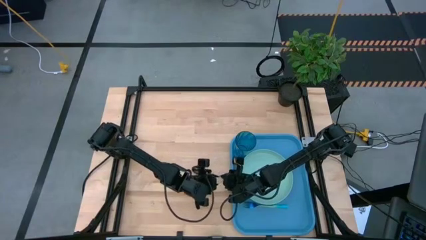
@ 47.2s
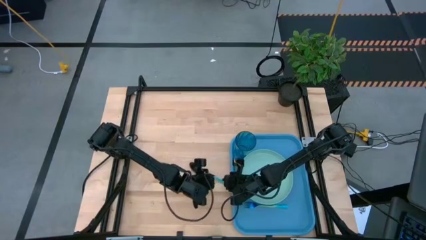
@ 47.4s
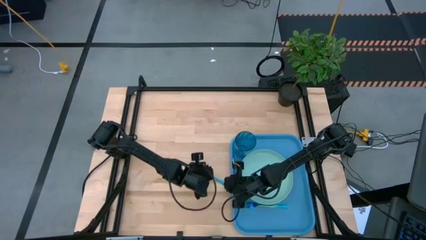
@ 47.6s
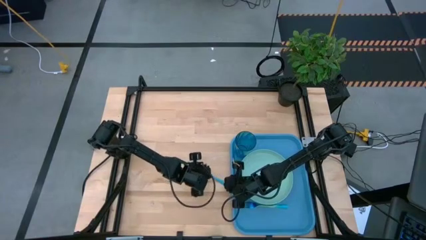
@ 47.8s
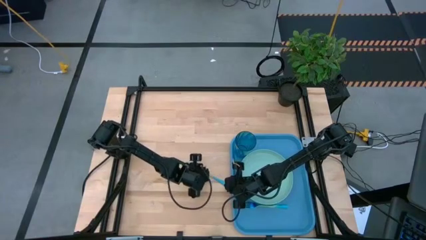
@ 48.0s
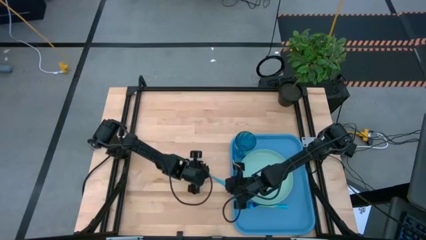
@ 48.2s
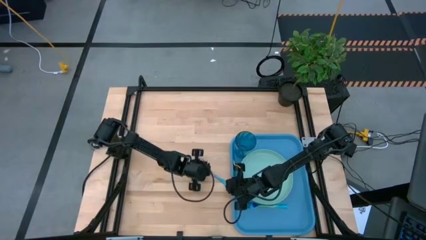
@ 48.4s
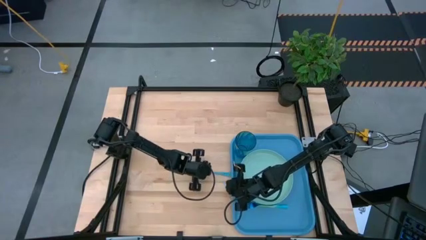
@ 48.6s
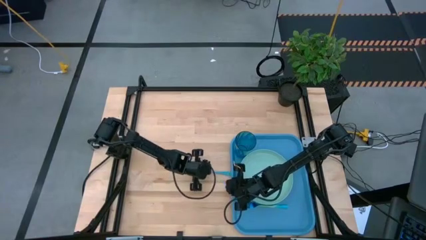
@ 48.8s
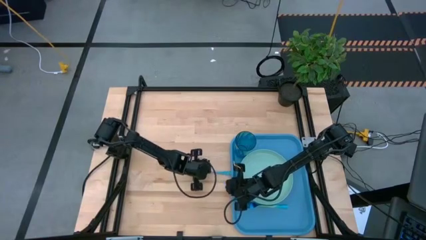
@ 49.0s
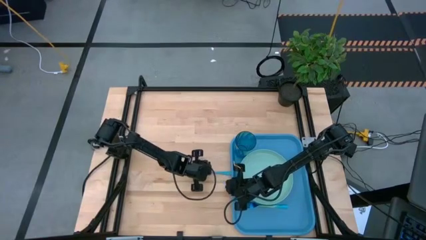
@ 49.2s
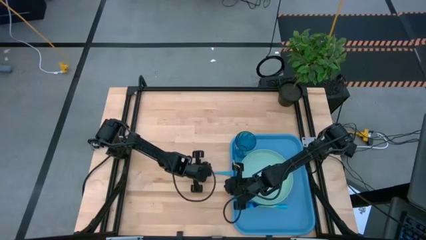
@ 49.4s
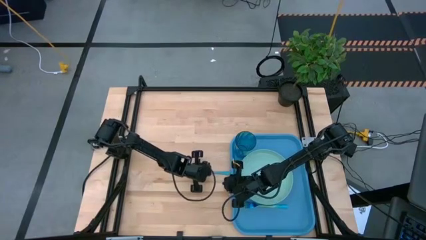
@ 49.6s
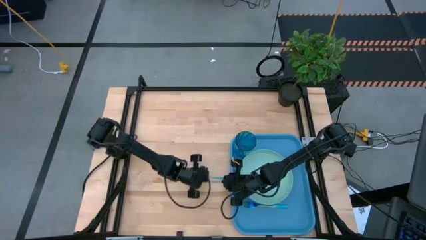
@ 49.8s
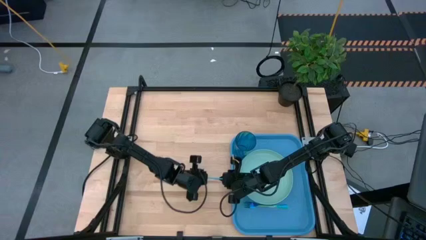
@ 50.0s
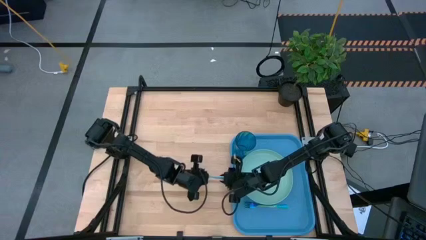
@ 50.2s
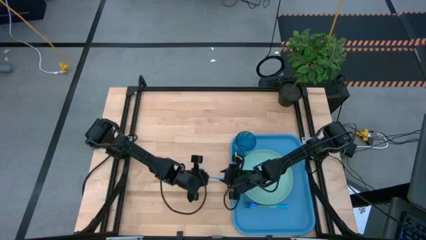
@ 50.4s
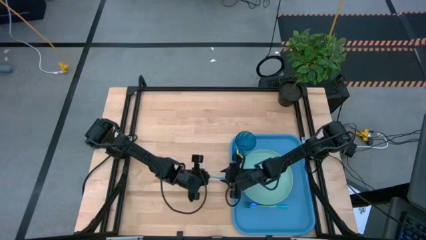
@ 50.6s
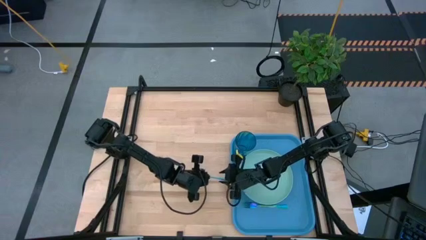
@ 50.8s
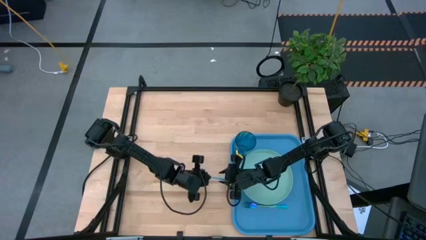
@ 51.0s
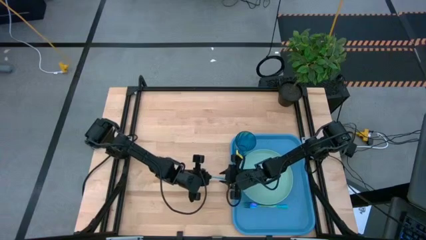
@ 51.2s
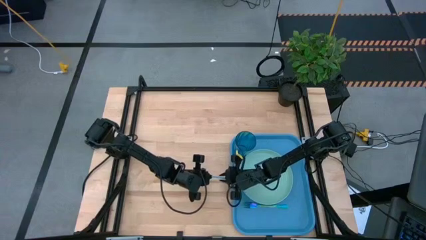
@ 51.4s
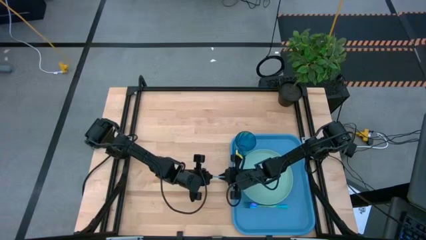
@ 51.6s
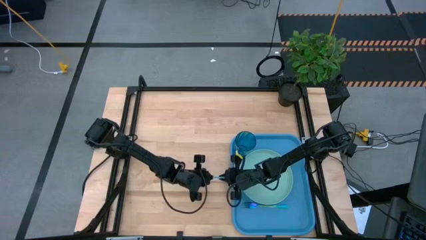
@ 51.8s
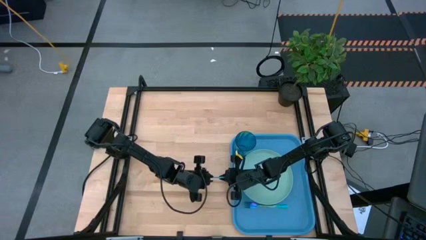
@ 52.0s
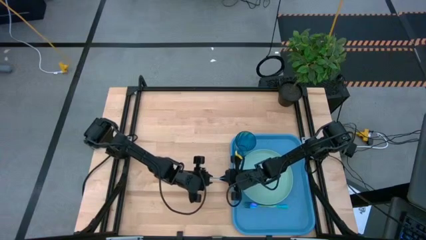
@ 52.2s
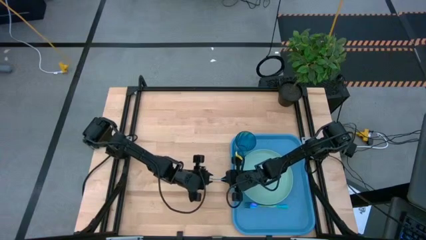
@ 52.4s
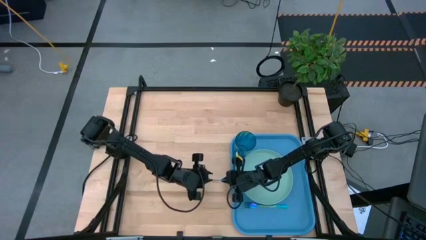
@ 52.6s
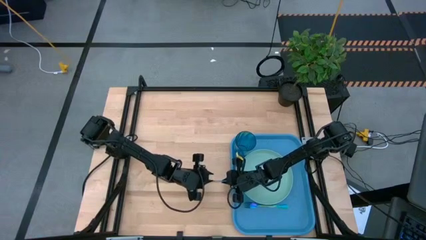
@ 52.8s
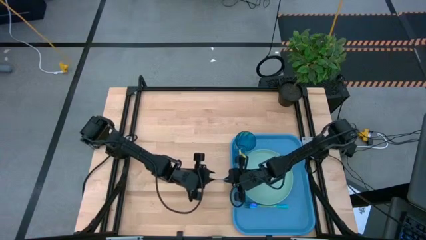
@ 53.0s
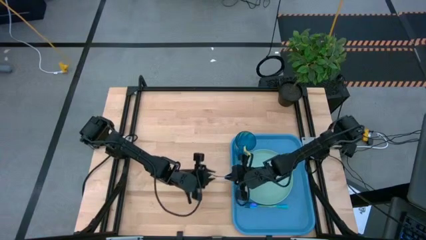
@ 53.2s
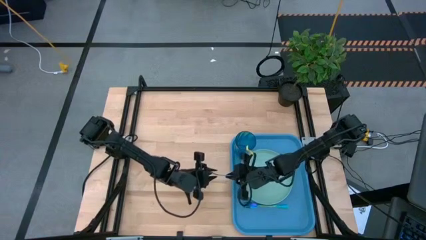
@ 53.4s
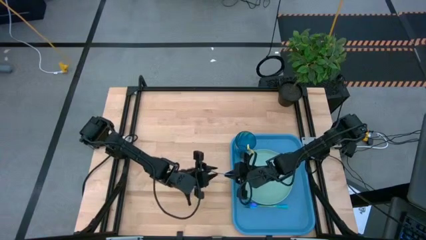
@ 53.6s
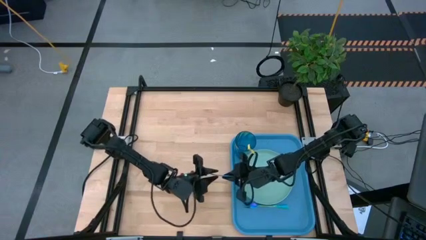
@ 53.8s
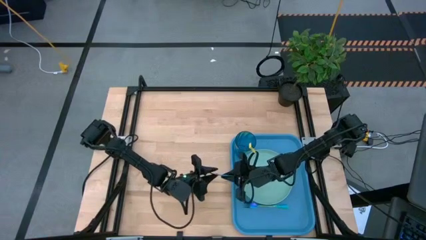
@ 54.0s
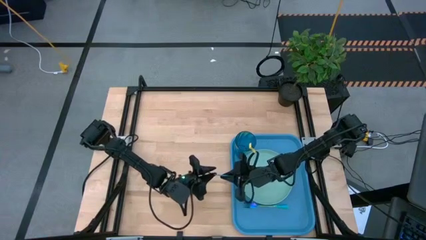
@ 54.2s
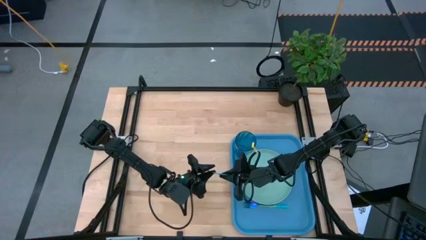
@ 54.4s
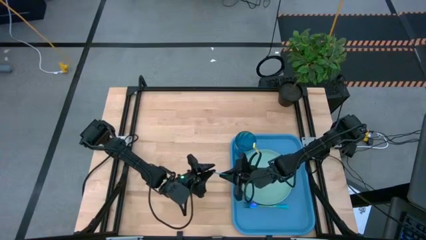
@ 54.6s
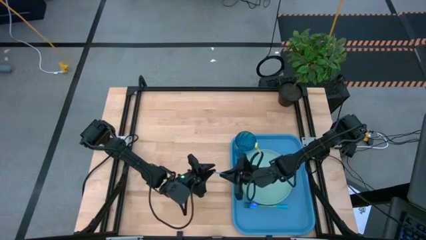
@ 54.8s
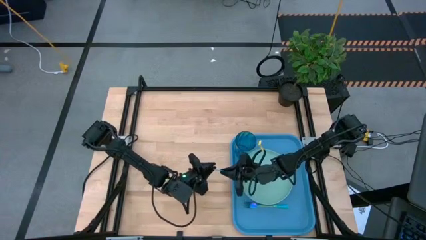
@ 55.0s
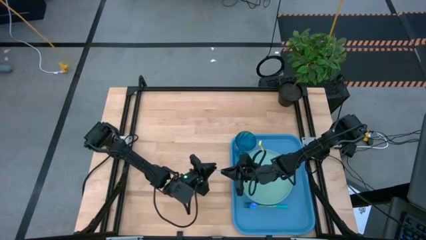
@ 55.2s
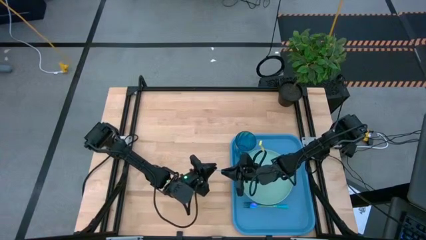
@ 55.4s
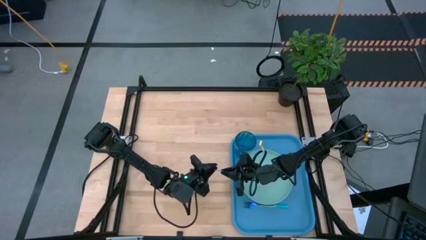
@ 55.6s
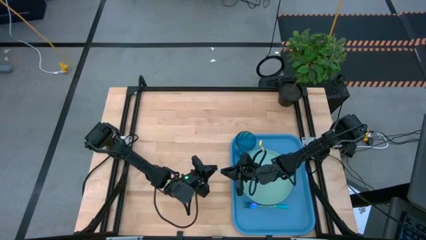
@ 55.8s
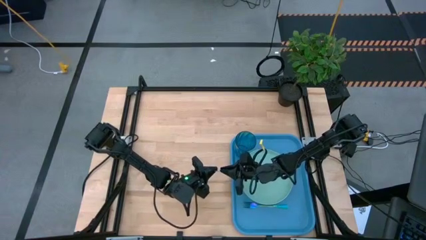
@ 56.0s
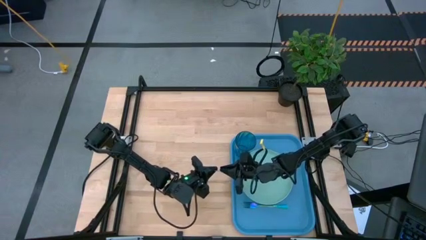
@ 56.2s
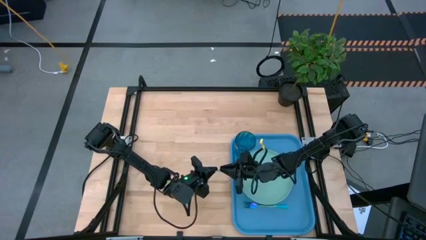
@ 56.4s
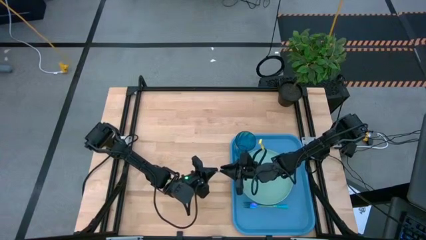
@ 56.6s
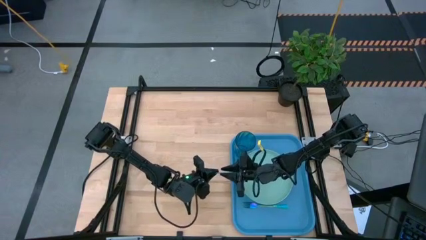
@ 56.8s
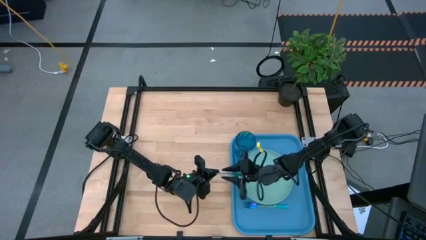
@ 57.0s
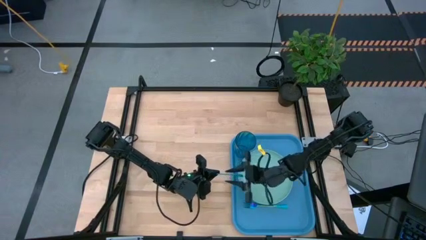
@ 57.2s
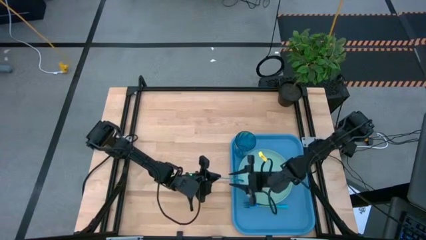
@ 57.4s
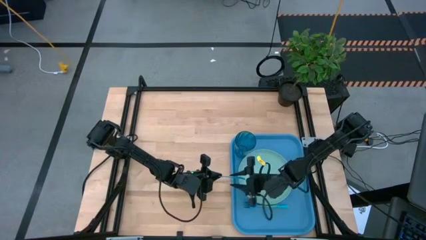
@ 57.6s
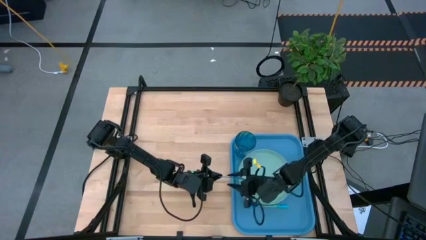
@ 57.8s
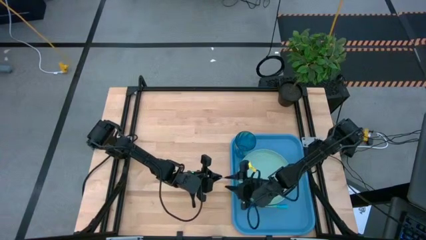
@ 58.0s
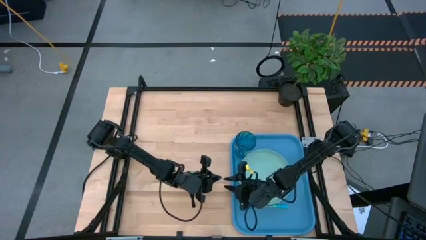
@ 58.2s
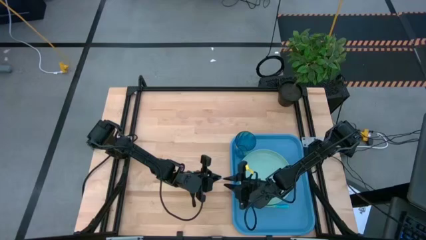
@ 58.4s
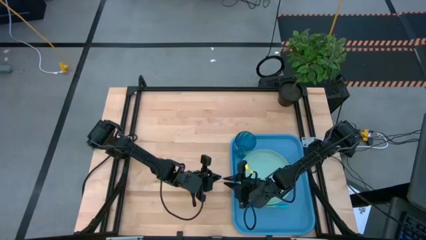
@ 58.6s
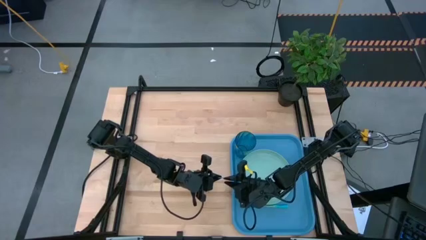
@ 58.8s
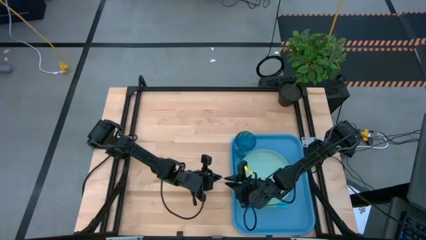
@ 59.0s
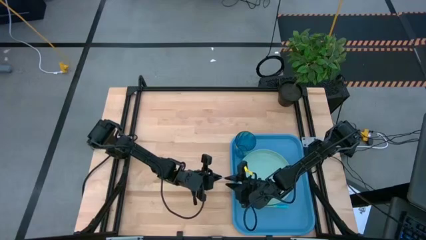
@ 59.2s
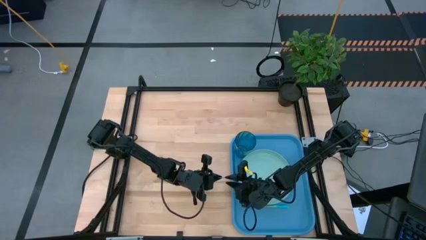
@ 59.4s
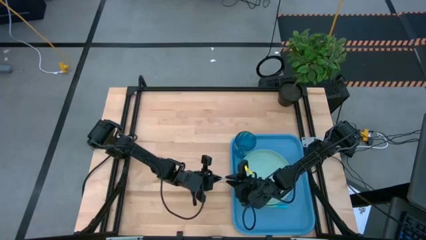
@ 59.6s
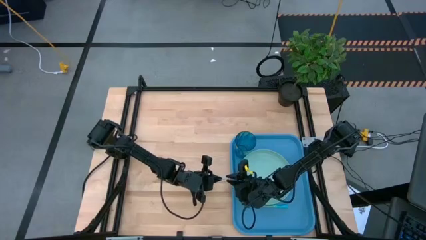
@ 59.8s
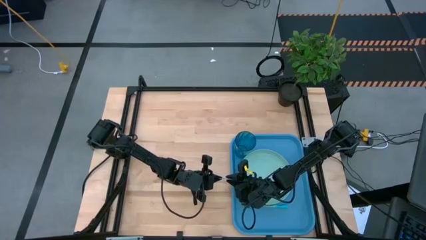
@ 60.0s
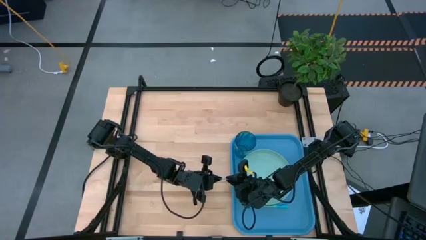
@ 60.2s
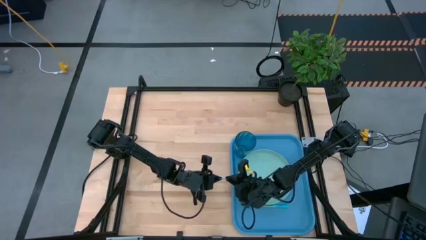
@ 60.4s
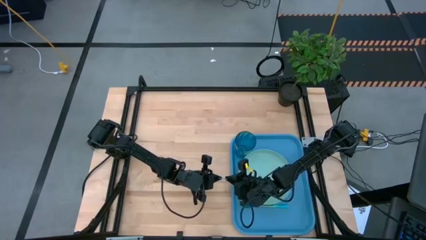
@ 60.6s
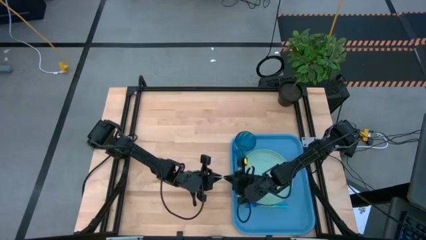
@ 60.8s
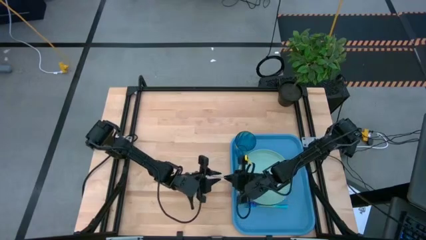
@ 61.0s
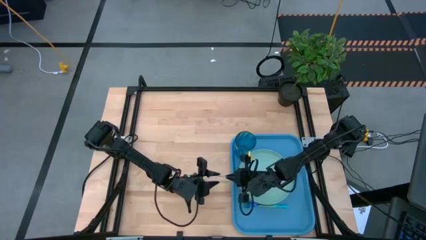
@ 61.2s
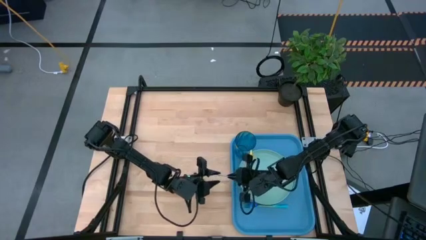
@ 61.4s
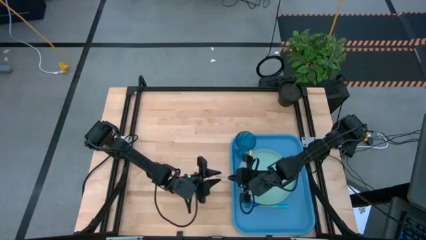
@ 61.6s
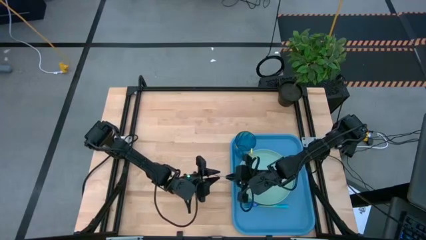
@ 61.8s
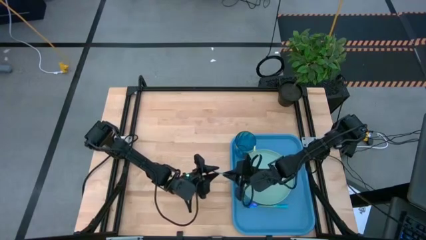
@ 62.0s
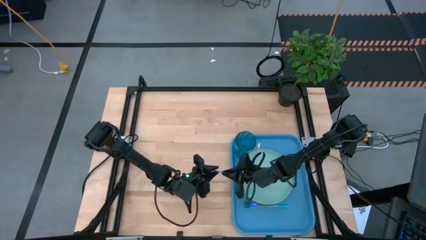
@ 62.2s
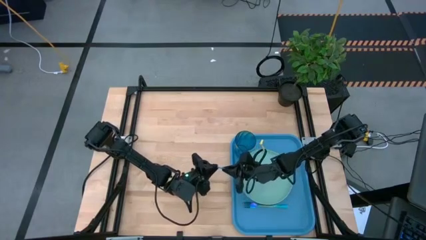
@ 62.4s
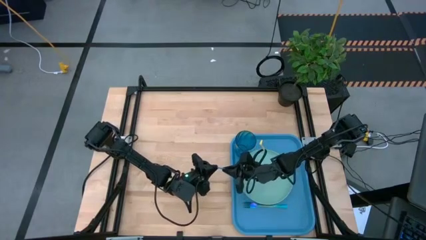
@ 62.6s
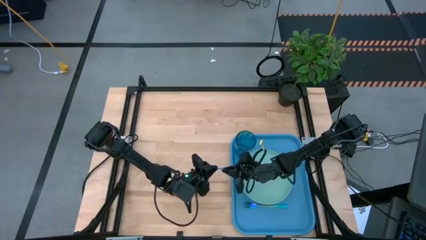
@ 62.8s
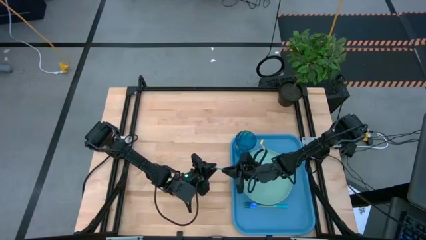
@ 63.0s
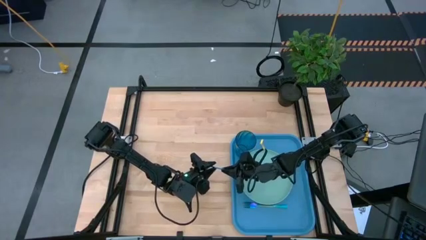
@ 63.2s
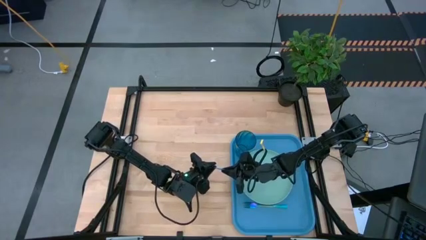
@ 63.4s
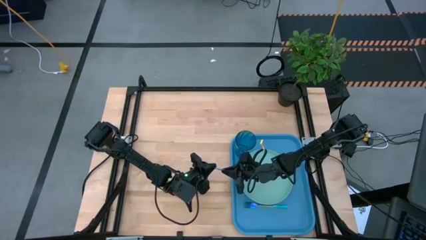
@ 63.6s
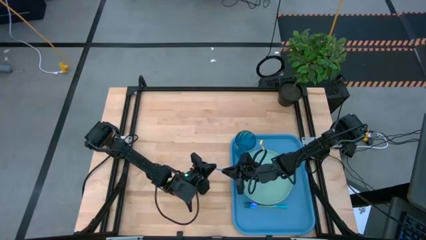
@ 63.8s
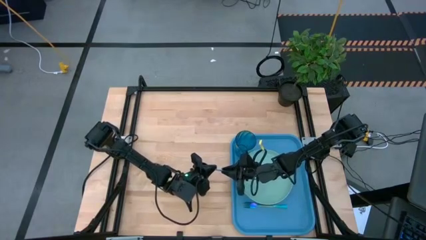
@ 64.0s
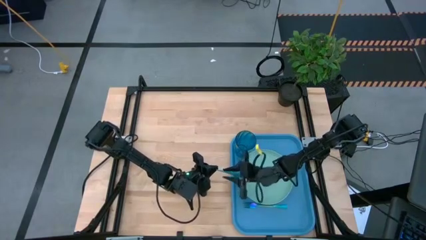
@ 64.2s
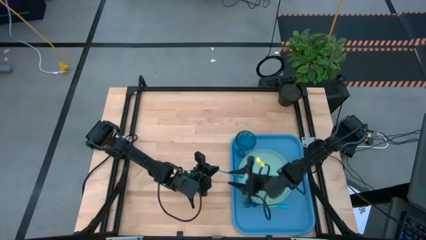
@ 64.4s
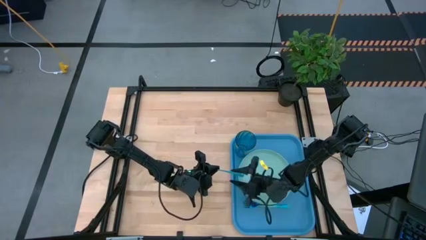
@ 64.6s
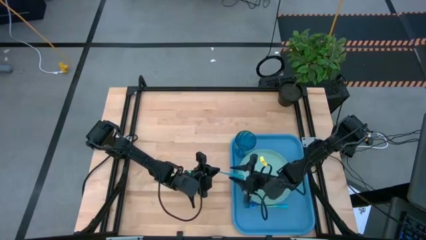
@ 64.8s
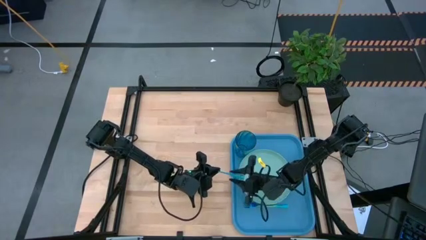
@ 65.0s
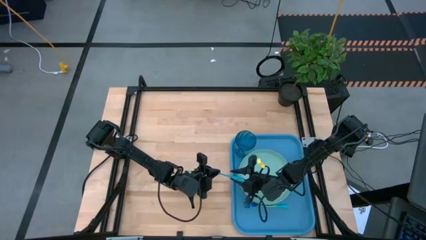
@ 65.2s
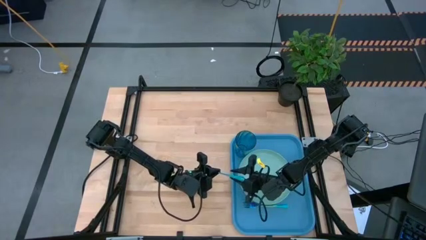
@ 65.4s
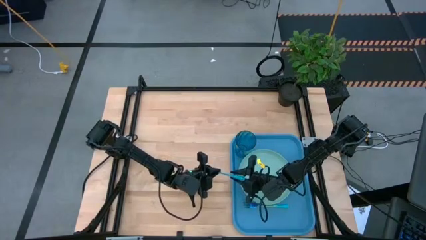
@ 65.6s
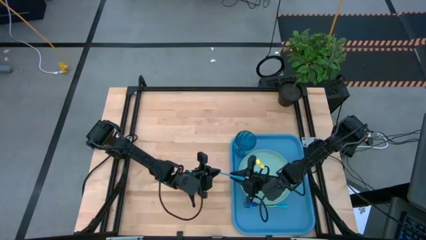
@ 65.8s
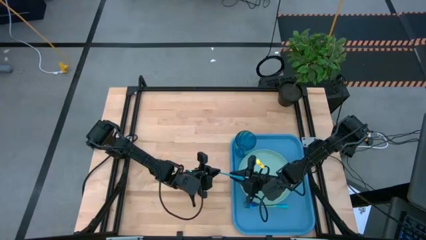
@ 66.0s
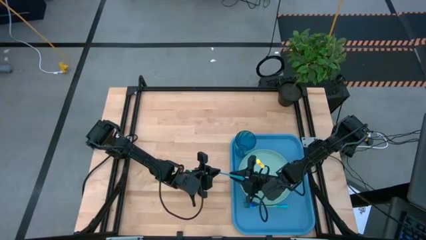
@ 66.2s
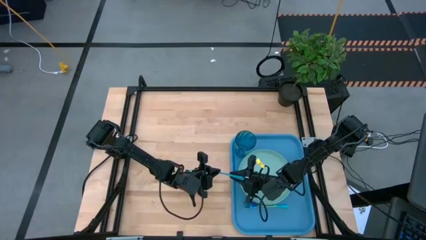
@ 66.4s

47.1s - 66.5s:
Task: Pick and place plate/cup/fork/spoon on tray
Put the blue spoon on the blue serving tray to the left of the blue fork
